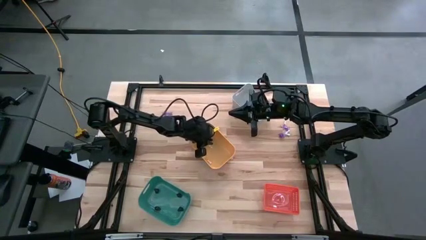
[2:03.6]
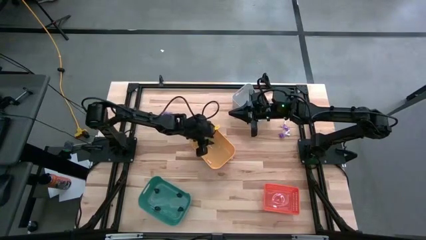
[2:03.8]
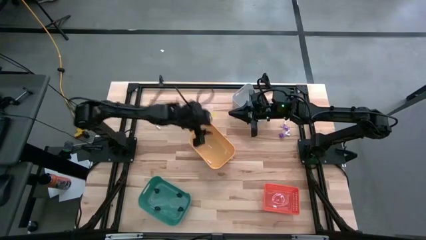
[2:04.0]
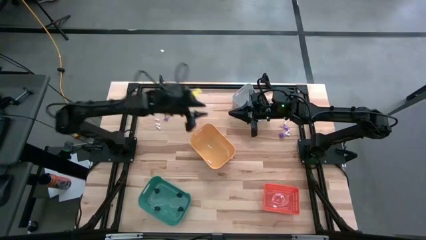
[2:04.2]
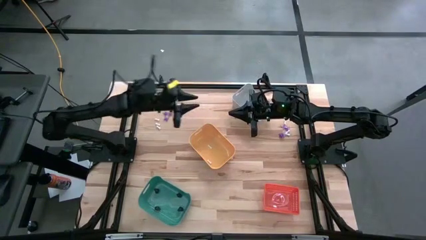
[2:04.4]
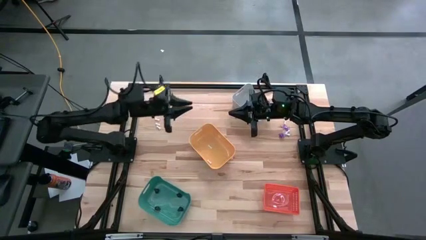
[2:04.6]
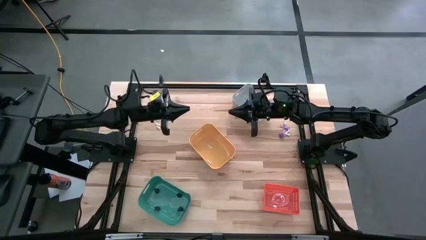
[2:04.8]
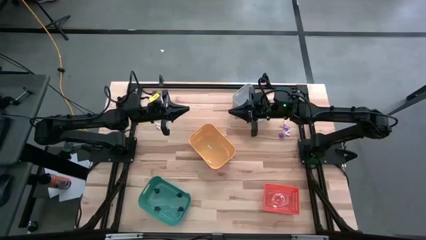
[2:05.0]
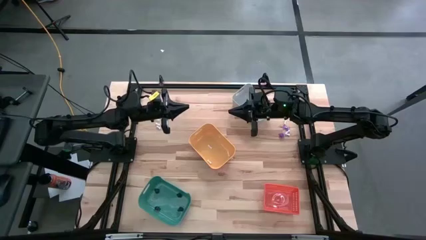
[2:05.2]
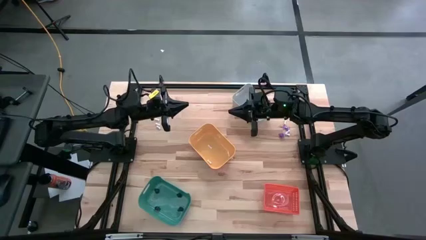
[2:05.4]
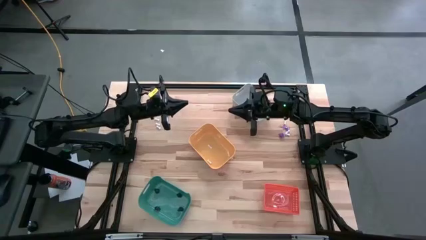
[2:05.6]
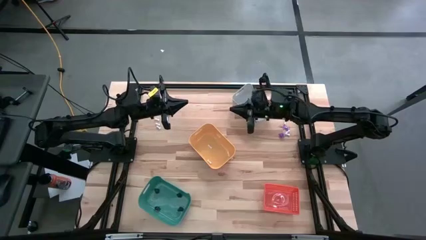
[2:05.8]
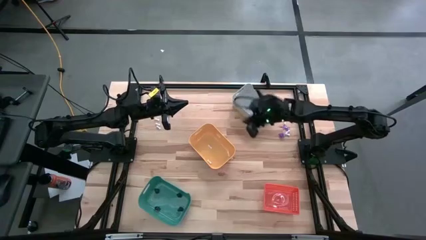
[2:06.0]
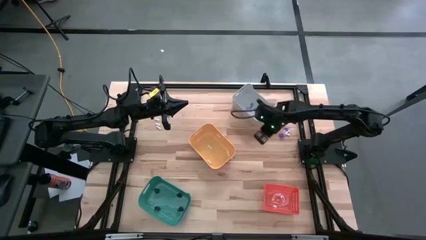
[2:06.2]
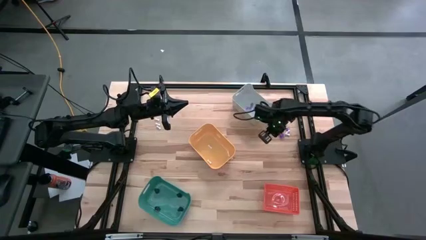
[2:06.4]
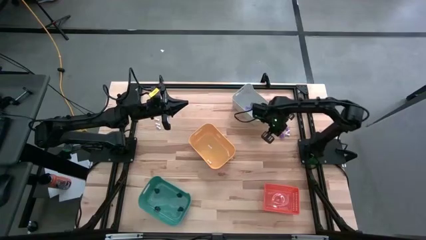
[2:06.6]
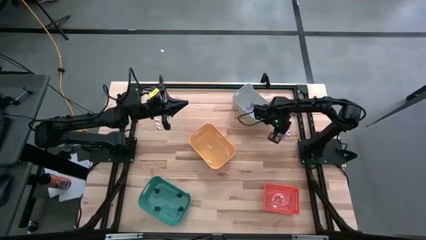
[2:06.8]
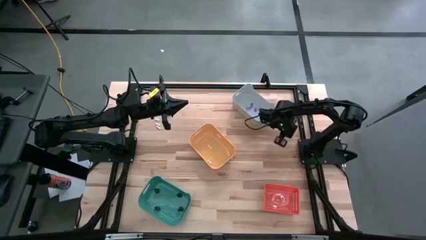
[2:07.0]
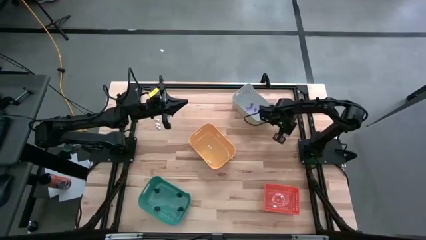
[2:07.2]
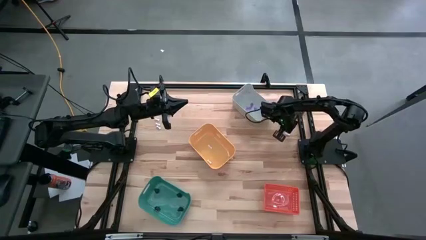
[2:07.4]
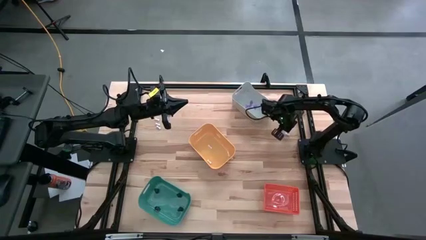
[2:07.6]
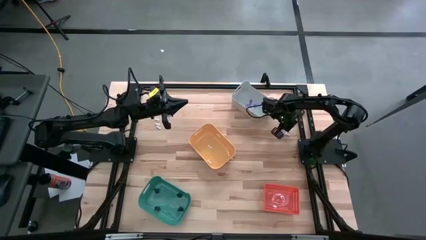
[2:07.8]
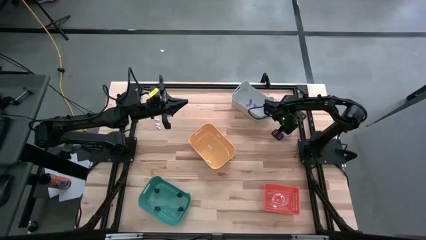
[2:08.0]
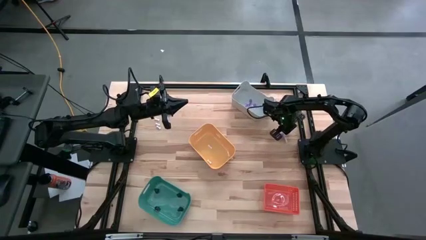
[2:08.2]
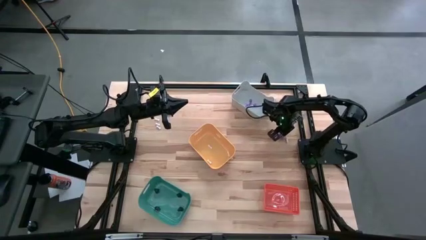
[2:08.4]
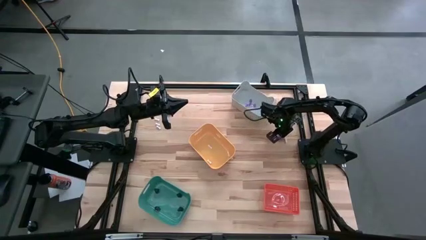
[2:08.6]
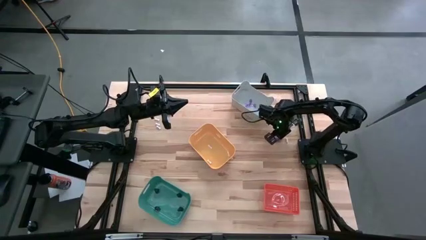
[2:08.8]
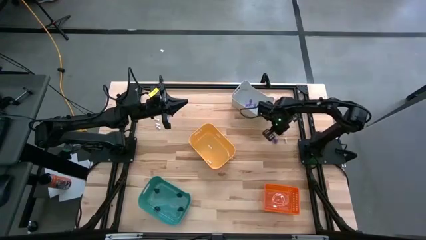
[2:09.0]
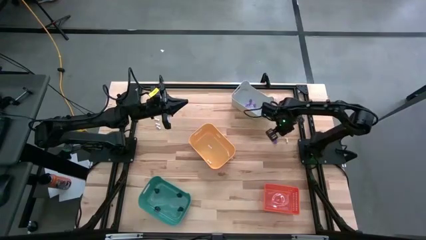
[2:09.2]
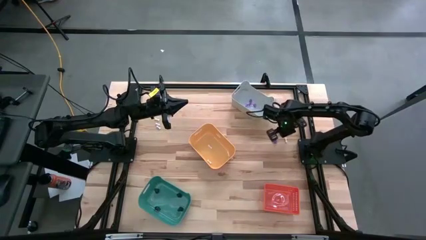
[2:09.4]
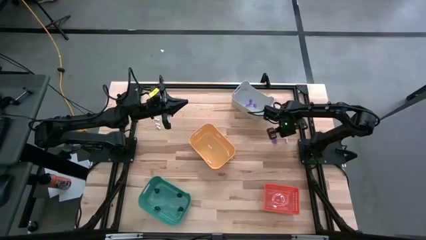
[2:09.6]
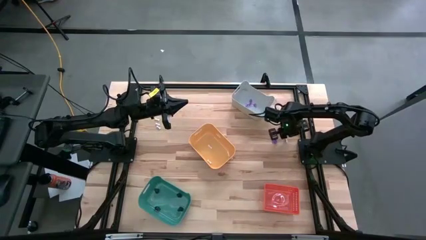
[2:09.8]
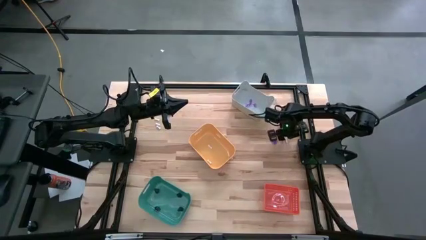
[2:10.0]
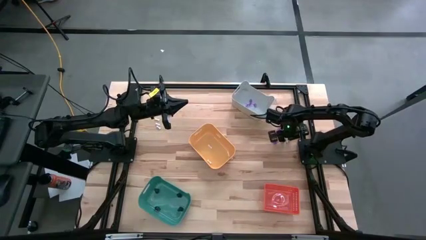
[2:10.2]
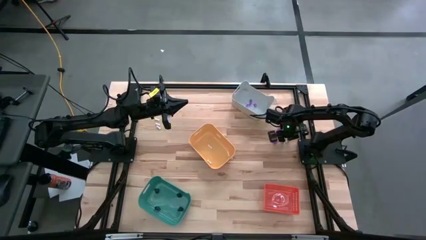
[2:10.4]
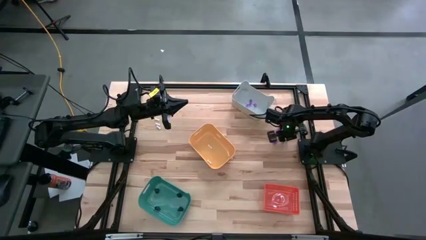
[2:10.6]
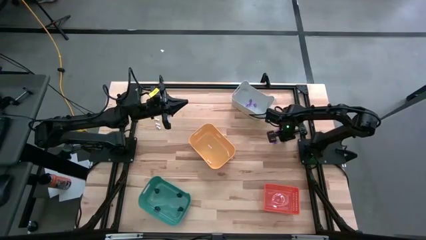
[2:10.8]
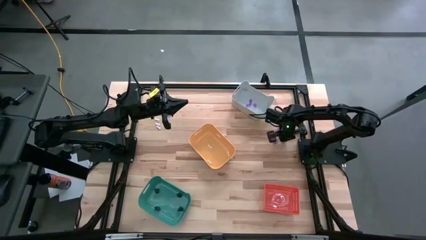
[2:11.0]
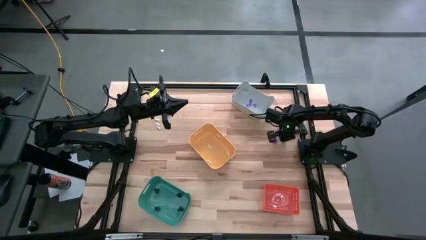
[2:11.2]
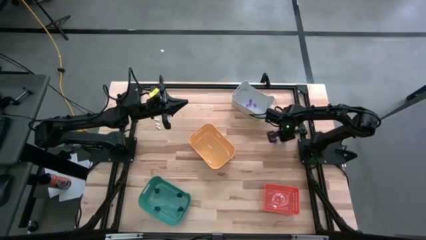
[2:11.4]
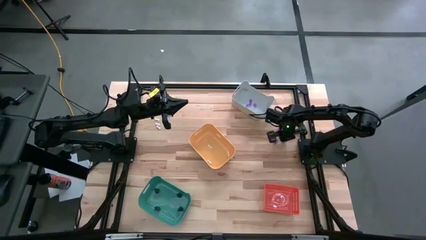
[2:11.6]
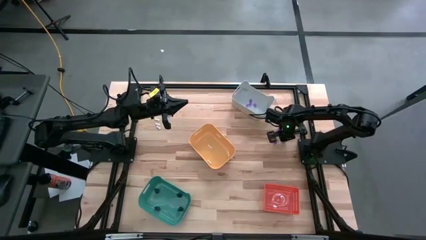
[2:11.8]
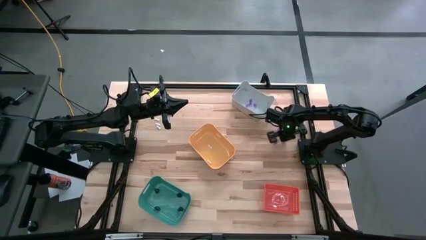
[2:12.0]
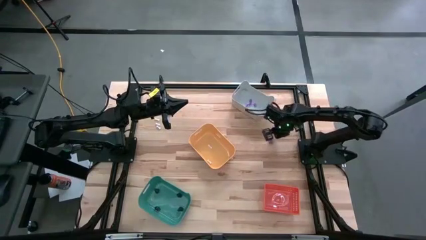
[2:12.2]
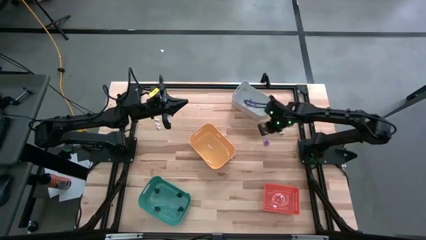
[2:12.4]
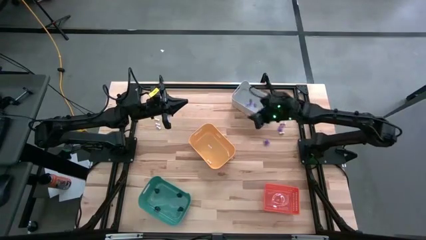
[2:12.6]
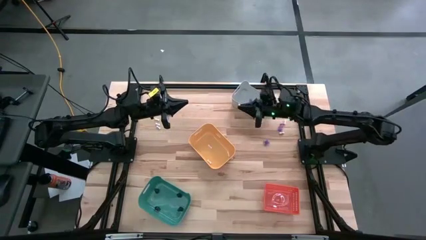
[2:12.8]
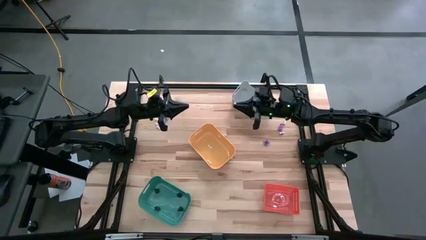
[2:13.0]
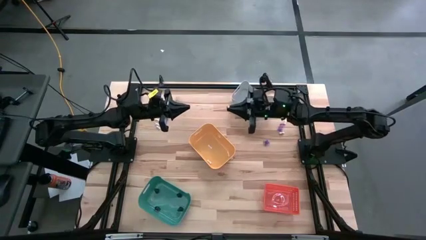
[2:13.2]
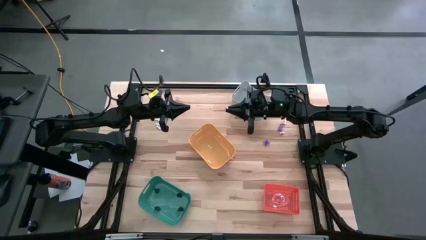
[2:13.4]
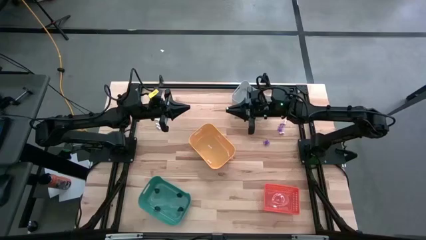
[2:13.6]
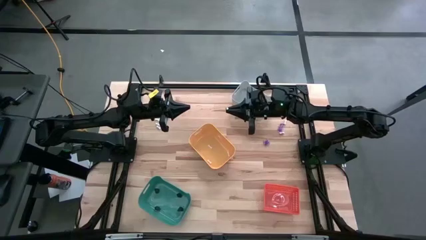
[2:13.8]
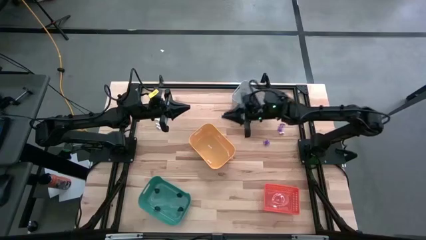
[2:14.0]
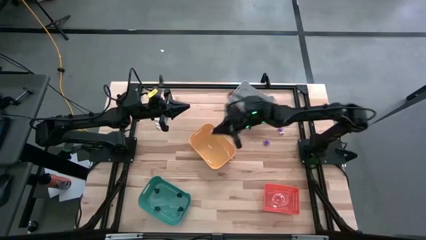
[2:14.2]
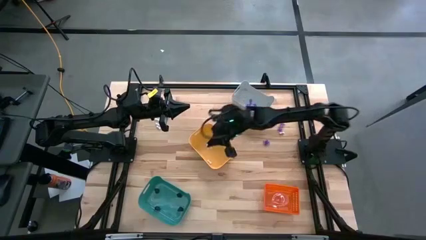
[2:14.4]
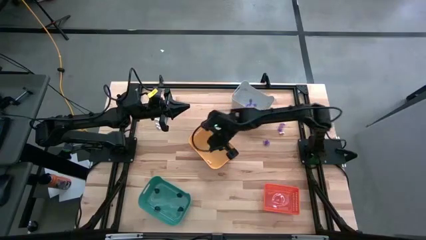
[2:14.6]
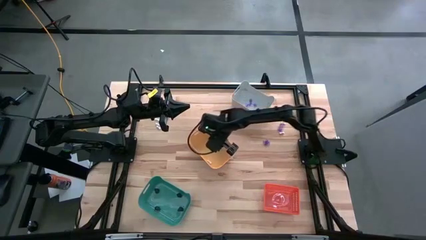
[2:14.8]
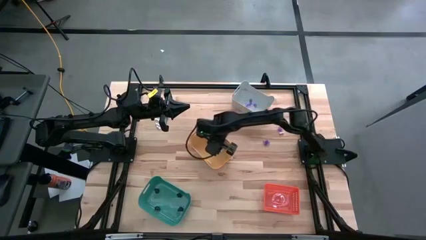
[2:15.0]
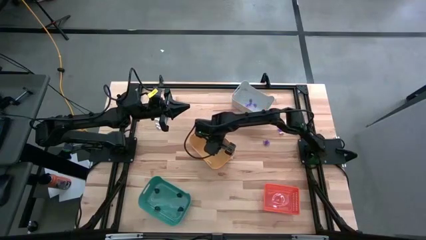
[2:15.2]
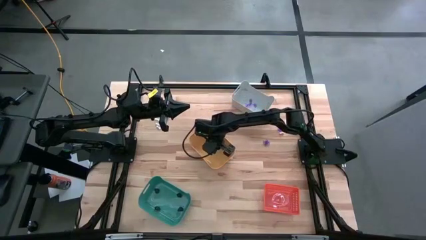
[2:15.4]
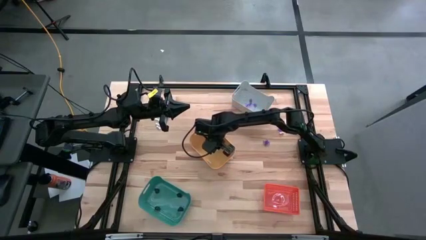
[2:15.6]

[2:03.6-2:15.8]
Task: Sort Halloween decoration
Put the white bone toy into the yellow bin

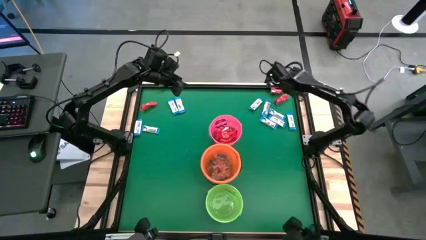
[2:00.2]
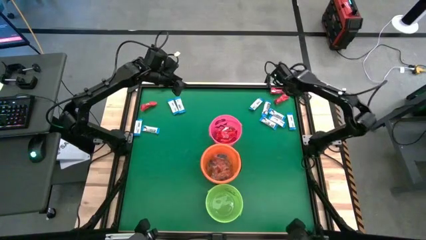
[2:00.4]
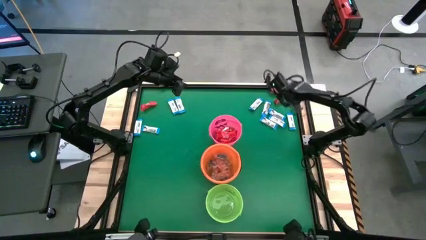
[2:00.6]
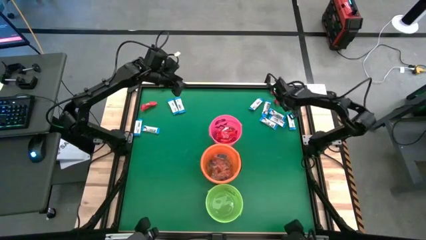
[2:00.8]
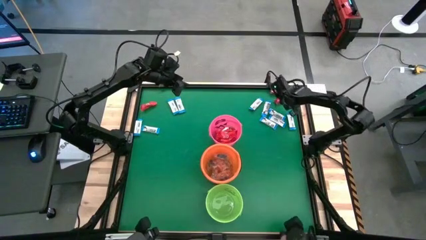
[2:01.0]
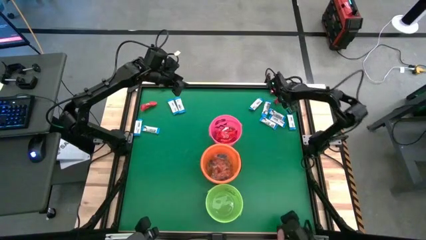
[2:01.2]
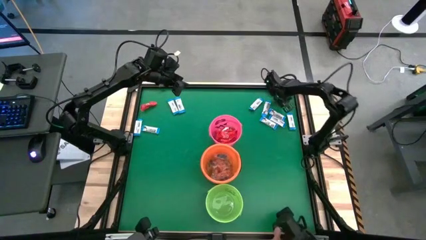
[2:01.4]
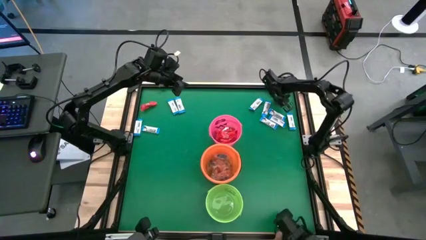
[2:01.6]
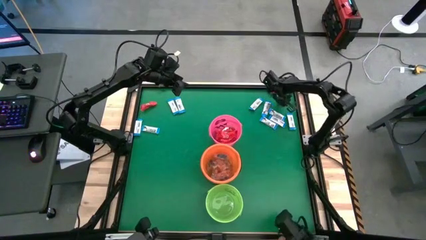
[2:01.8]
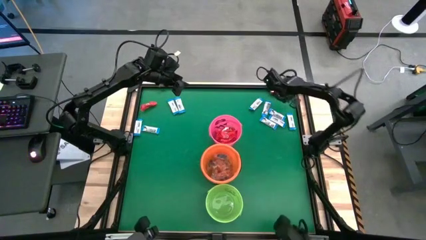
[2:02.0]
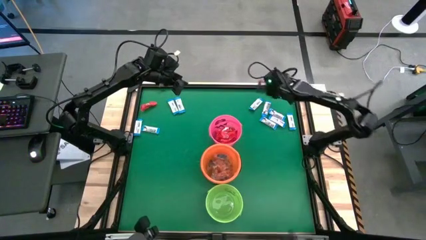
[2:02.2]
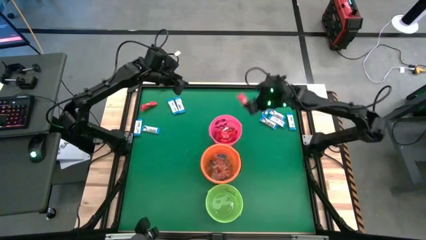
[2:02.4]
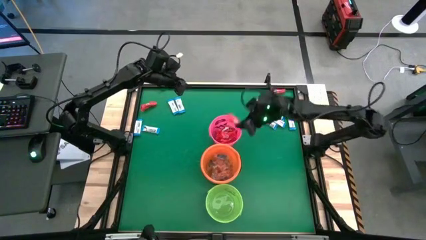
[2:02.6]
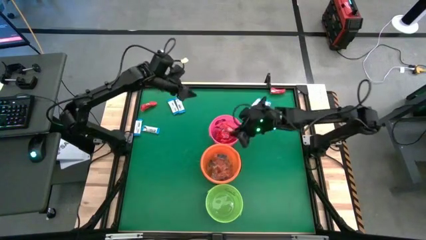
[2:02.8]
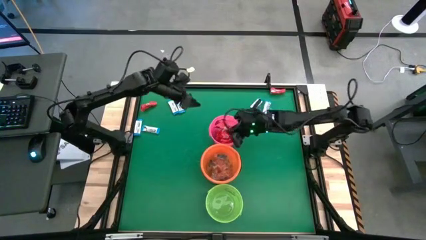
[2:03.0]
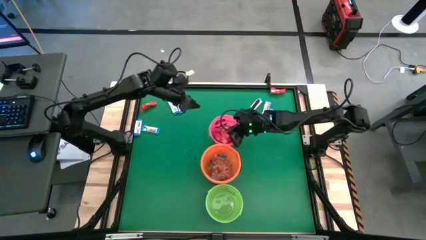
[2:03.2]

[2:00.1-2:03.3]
Task: Sort candy by brand, put in halloween buckets
Put the red chocolate into the pink bucket
